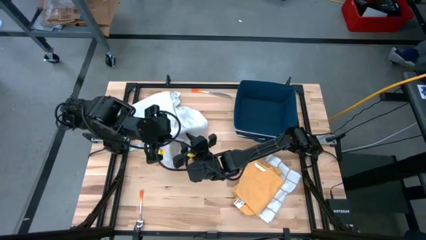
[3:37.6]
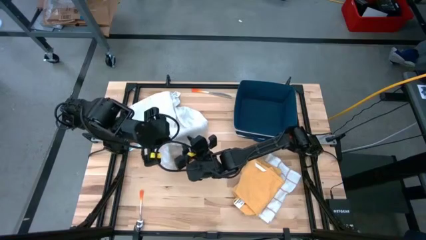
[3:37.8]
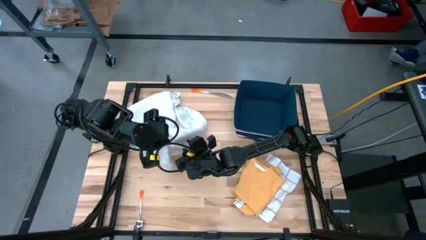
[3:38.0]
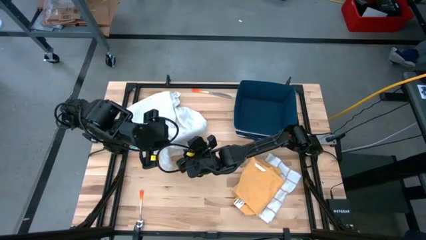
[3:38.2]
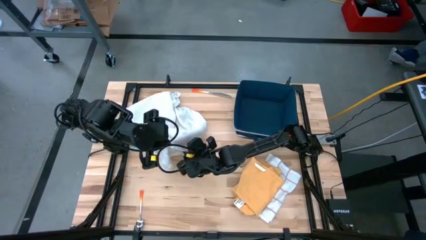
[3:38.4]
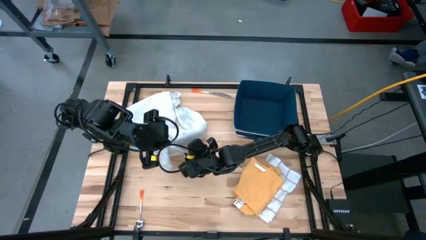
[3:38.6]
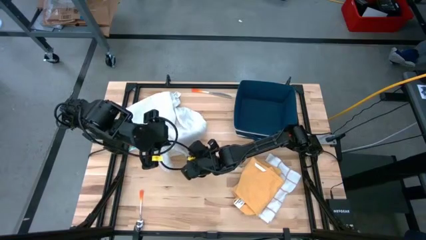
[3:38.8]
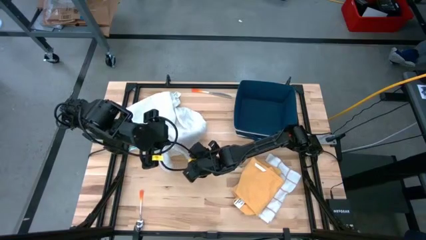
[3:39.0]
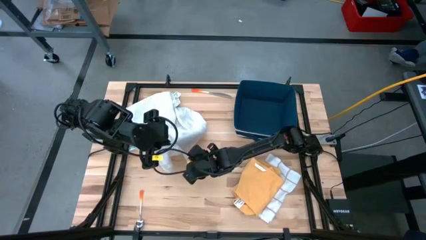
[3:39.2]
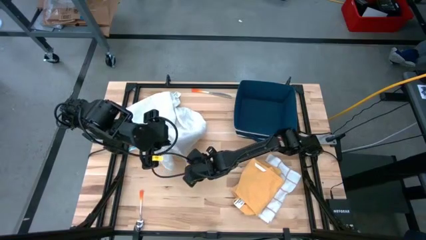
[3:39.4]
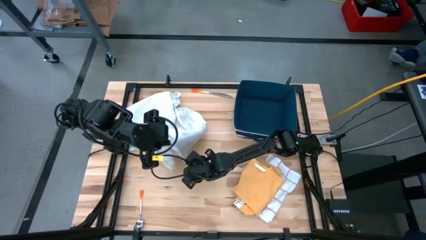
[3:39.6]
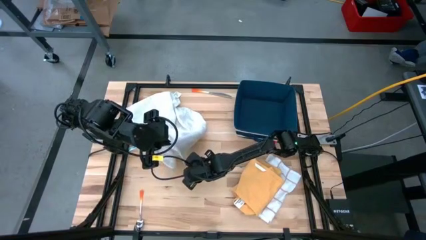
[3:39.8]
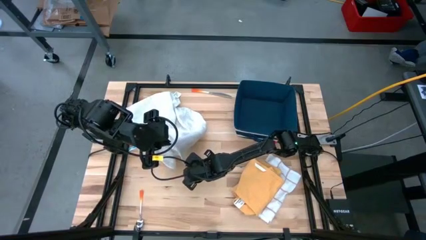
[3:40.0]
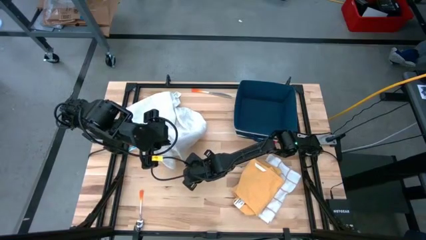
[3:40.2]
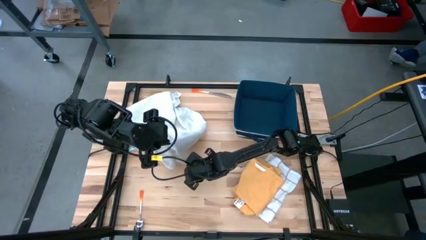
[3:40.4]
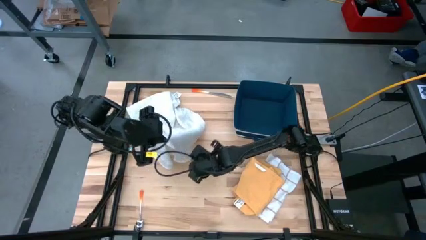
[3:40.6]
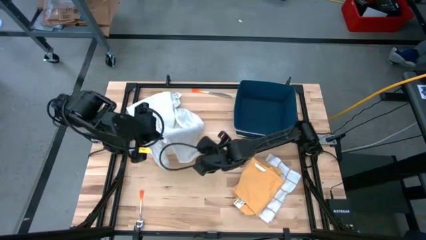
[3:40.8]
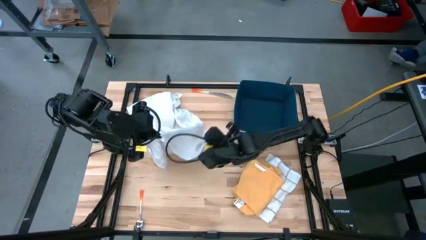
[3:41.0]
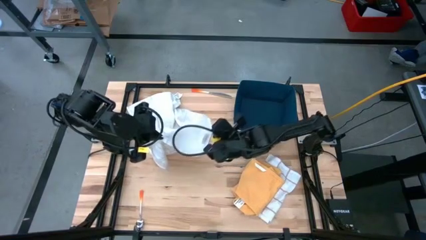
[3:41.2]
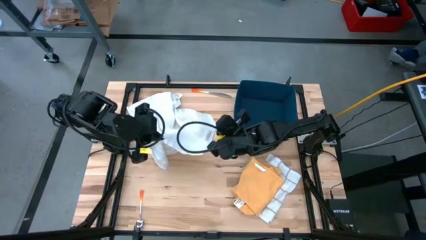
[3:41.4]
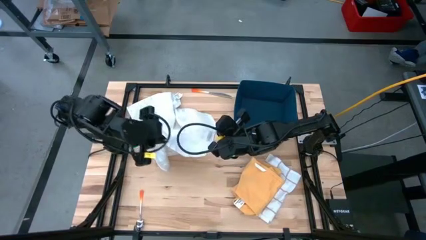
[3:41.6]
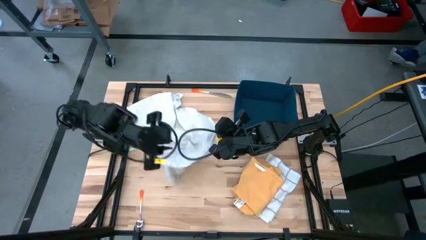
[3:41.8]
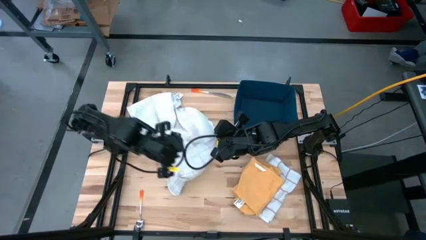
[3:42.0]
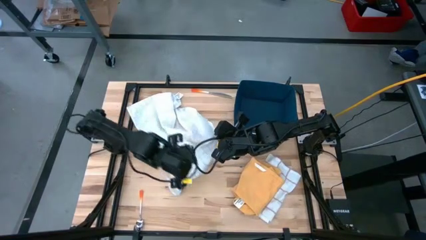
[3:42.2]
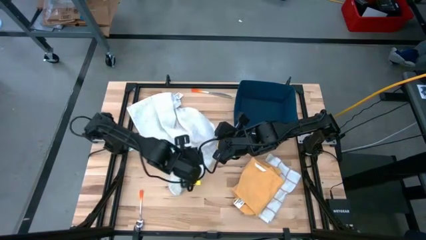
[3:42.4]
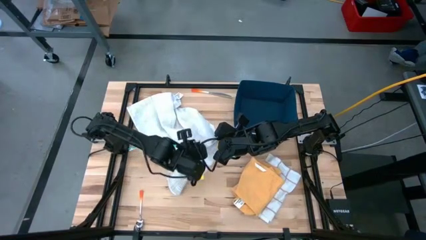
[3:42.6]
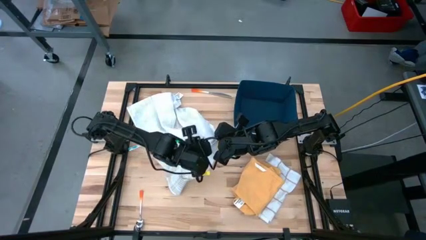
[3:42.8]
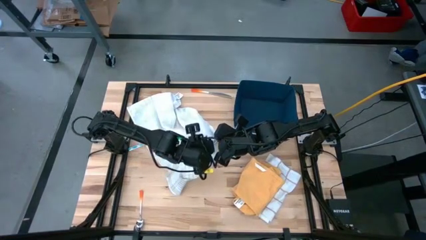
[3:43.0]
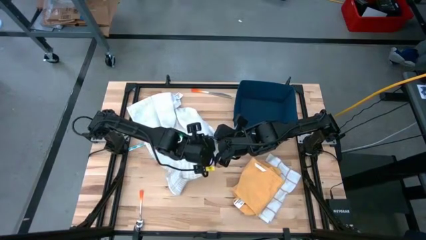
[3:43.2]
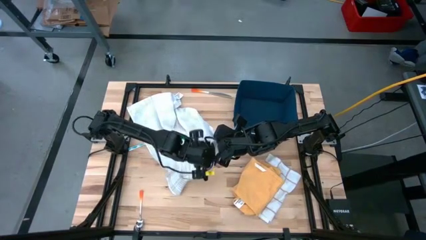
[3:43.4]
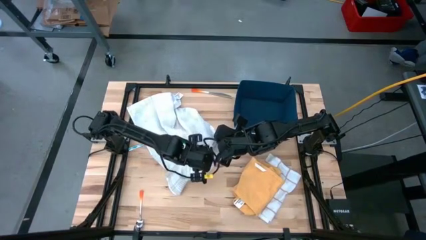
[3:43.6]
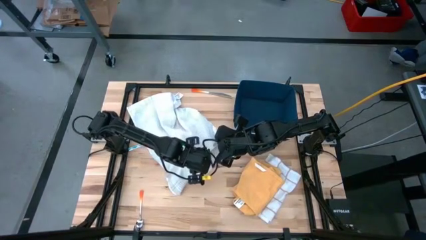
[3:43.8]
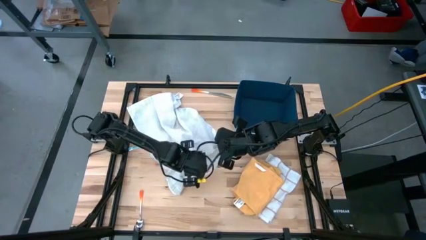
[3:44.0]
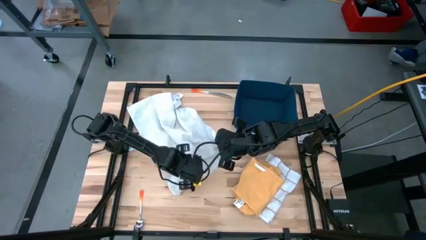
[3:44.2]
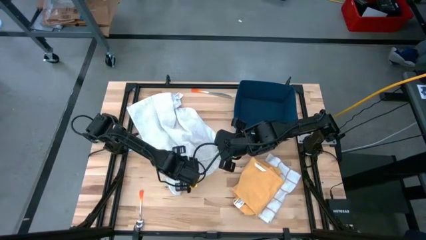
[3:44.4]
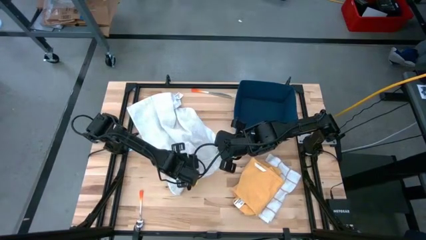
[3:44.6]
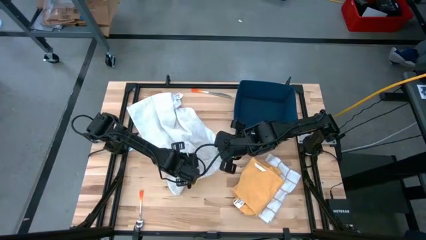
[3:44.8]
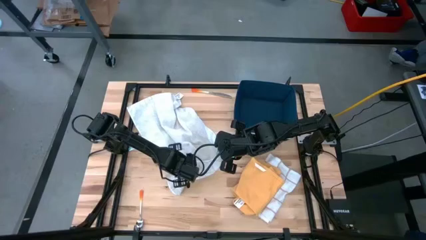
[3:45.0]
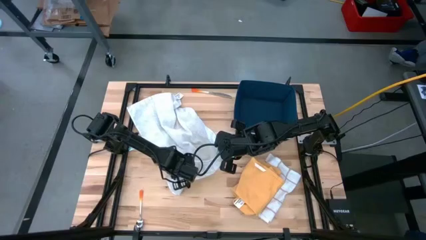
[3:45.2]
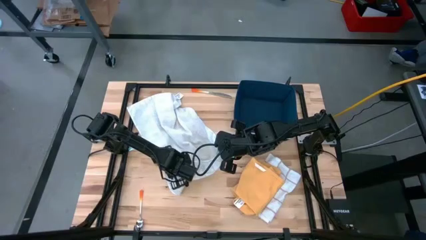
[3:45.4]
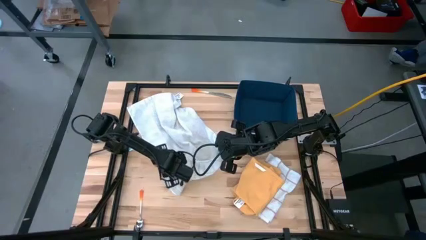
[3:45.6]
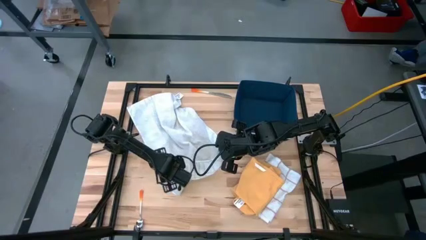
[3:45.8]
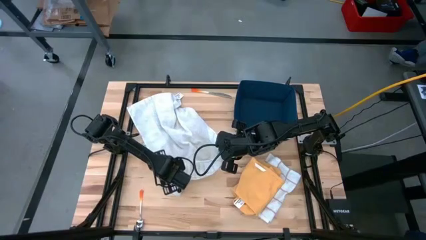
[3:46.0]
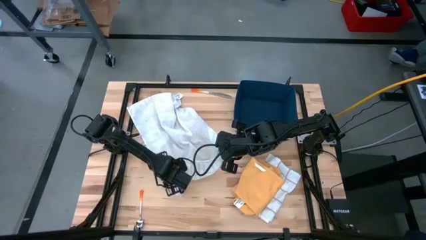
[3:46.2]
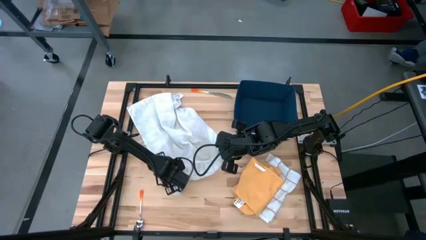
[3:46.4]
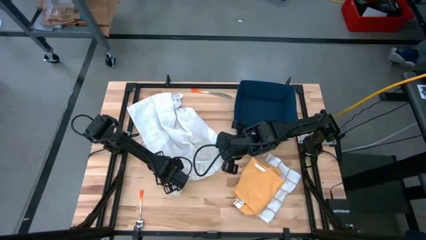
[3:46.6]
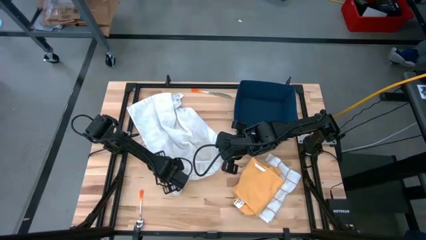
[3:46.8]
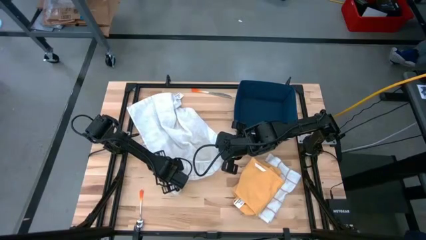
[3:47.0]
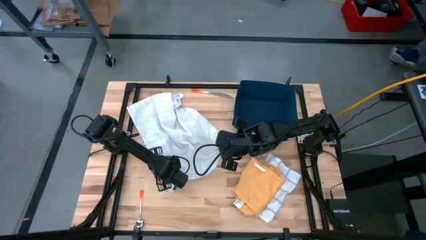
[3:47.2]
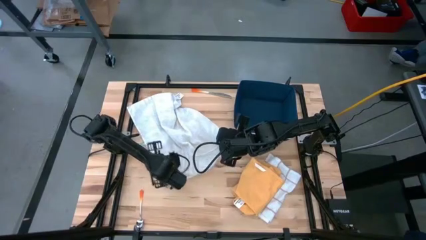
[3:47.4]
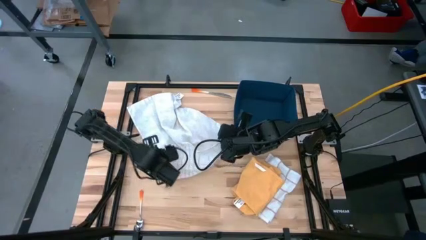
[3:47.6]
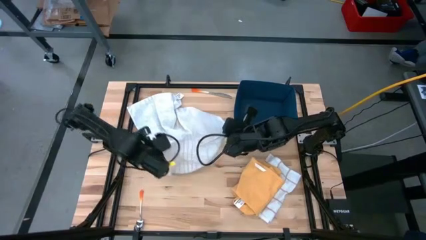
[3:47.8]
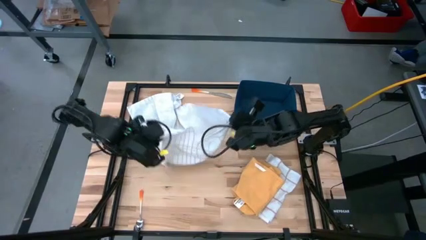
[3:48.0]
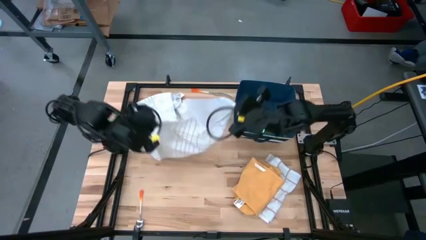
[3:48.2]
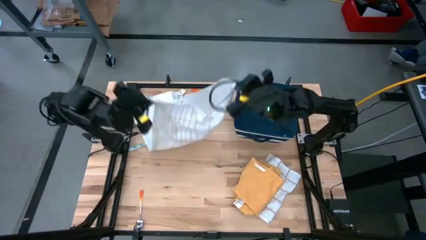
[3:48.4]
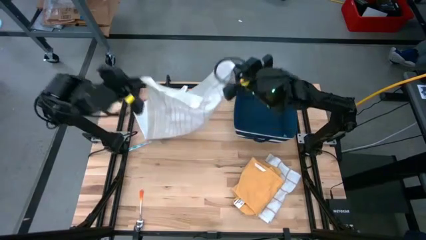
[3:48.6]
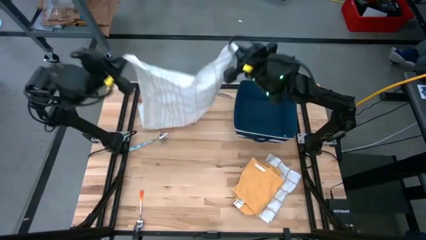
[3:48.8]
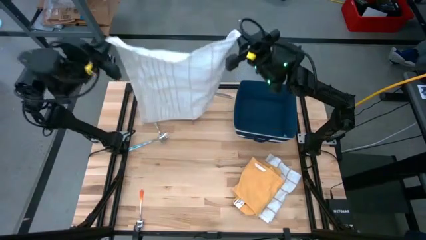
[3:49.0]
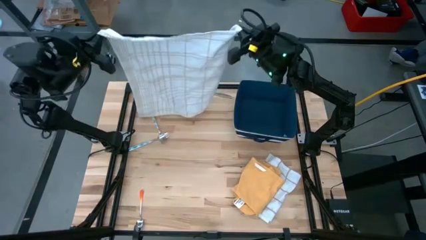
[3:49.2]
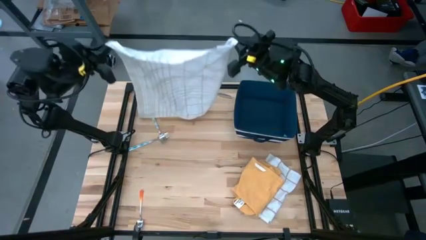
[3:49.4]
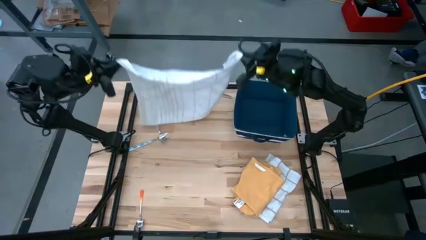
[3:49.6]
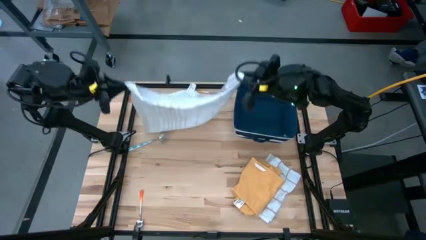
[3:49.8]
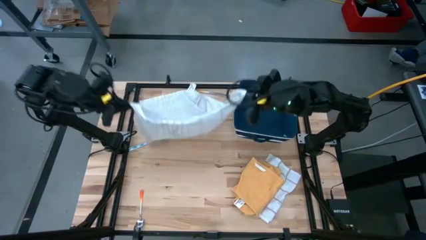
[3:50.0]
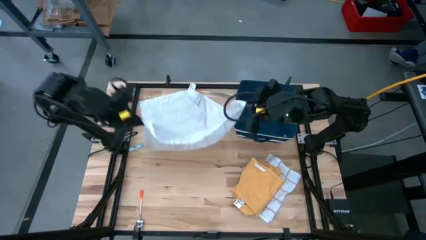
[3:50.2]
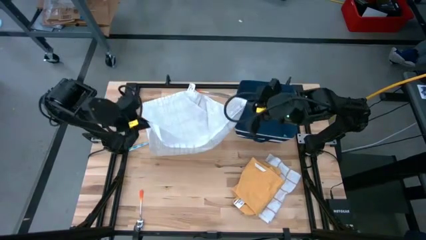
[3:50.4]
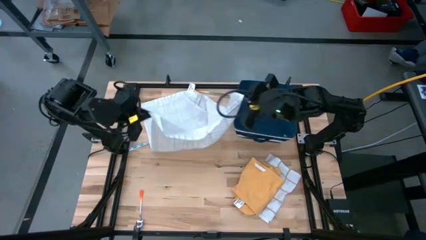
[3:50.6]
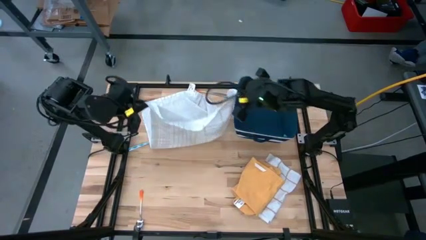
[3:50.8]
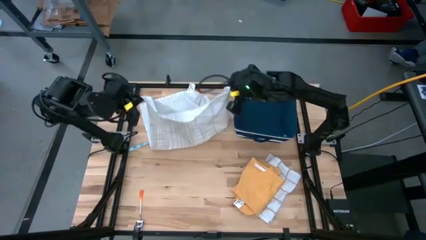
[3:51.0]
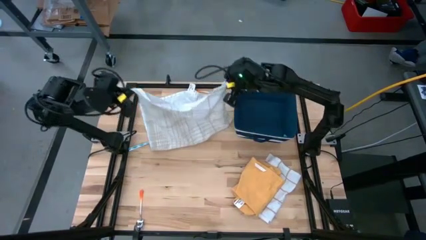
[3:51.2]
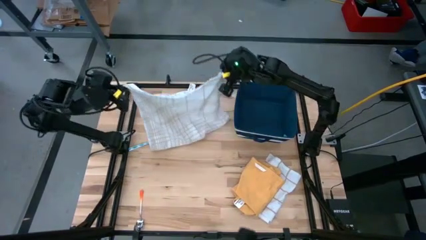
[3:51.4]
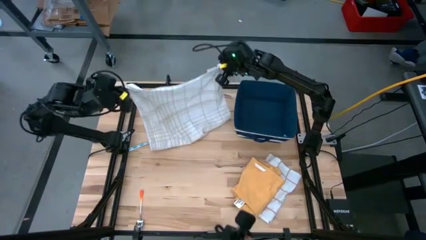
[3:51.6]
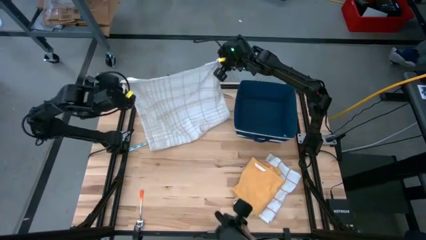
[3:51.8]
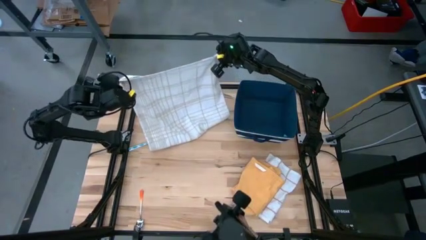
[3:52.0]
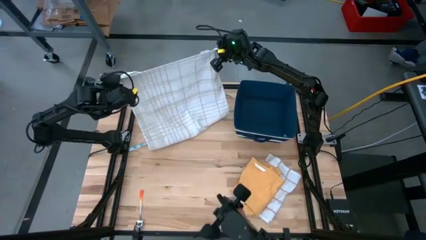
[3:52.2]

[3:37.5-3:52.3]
Task: Fold towel
Fold the white-and-gray checkered towel

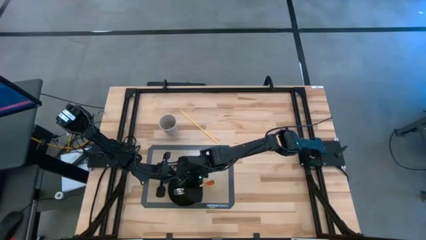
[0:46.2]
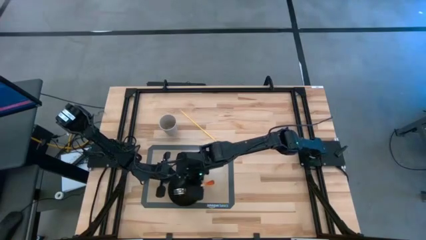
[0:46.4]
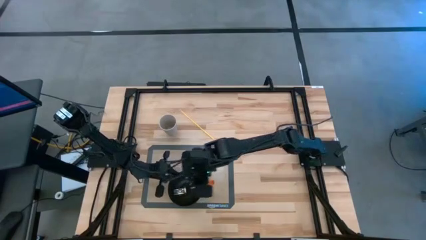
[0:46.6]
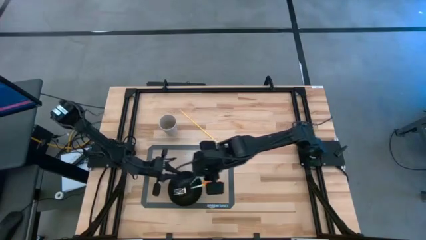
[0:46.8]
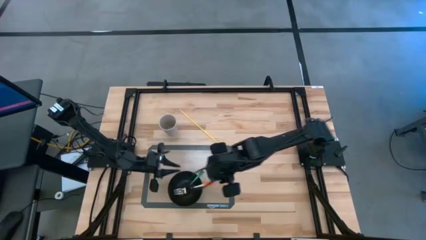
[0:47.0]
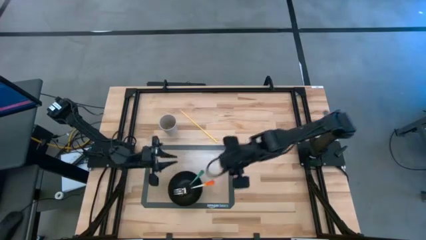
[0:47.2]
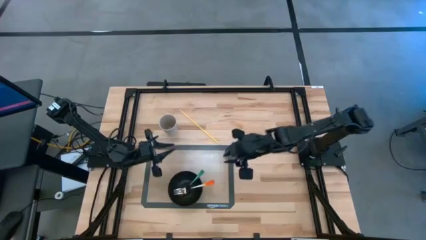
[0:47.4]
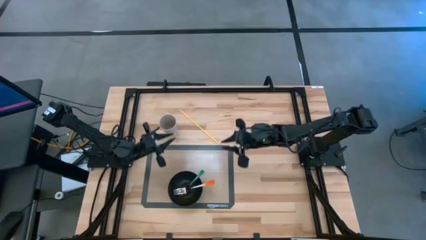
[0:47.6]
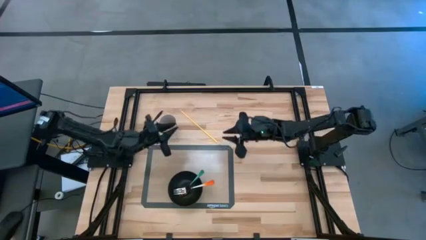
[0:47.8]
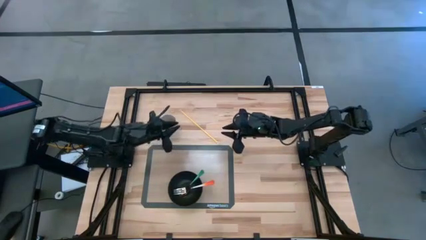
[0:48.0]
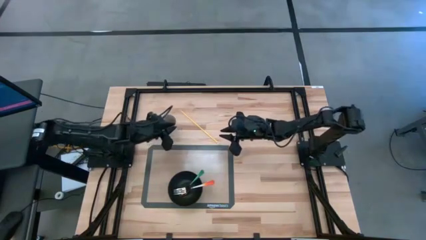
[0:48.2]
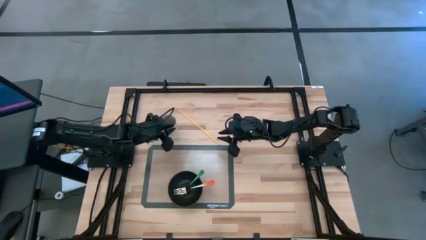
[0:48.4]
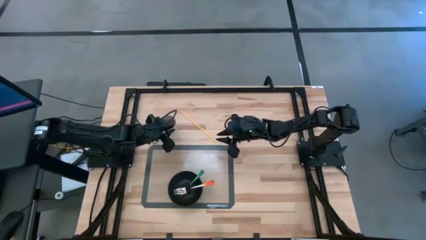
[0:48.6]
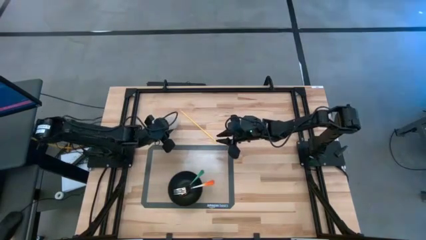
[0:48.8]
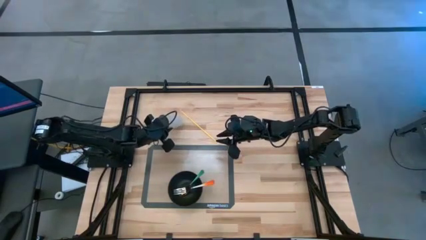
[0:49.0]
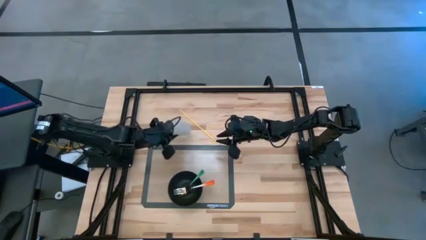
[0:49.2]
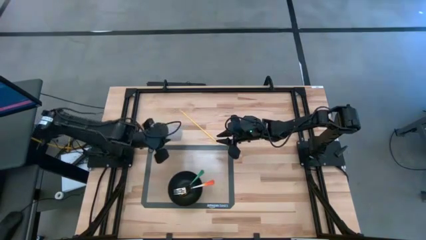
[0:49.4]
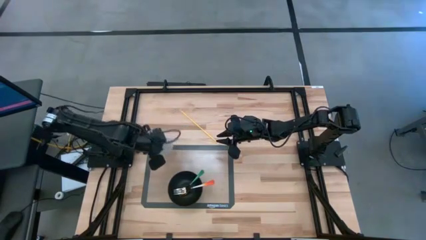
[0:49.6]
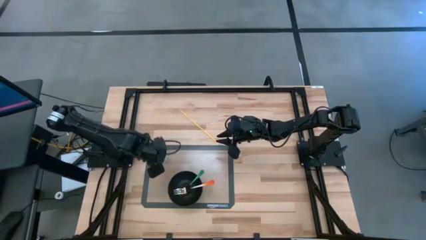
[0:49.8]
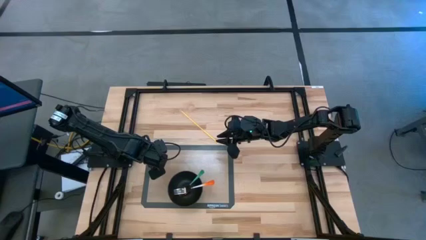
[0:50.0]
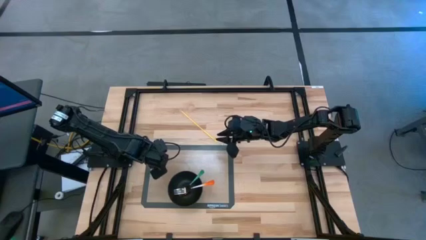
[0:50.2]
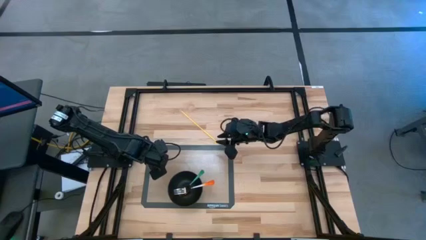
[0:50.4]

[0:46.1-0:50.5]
Task: Pick & Place Utensil
Put the white cup on the transparent mat to the top left of the black bowl
